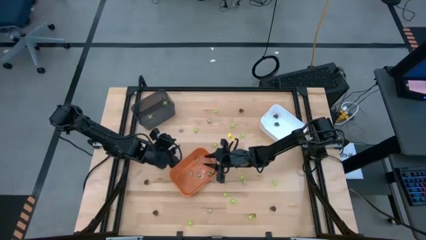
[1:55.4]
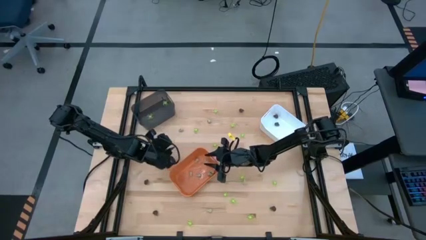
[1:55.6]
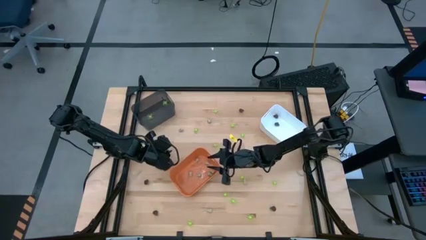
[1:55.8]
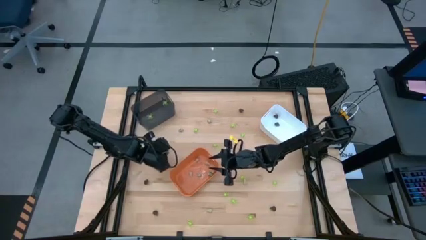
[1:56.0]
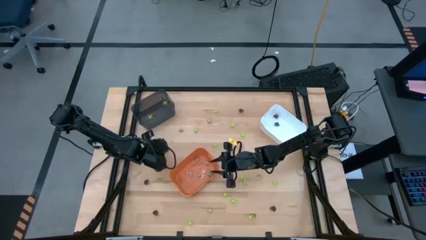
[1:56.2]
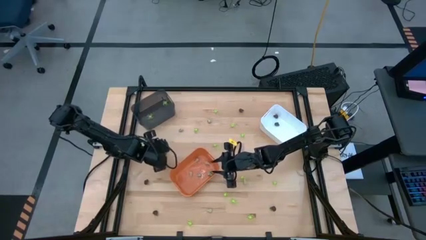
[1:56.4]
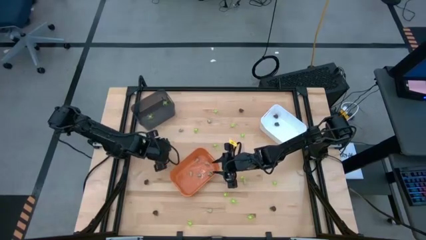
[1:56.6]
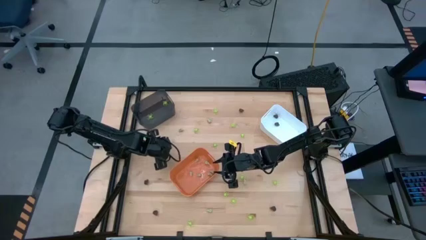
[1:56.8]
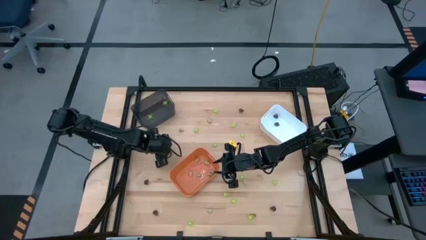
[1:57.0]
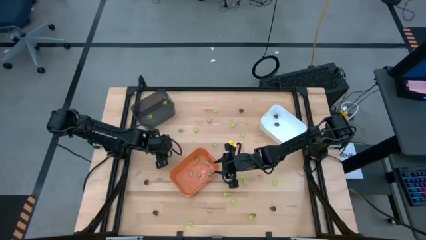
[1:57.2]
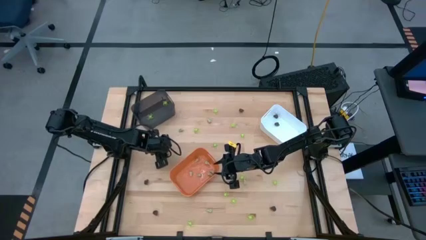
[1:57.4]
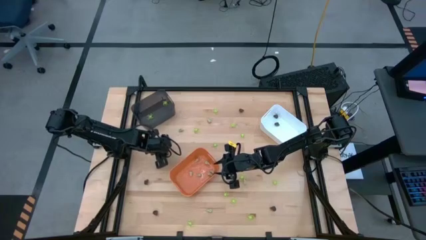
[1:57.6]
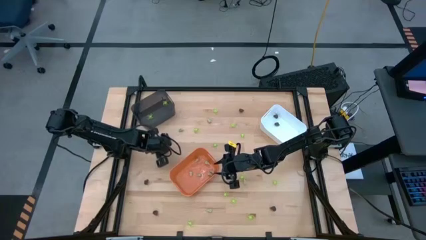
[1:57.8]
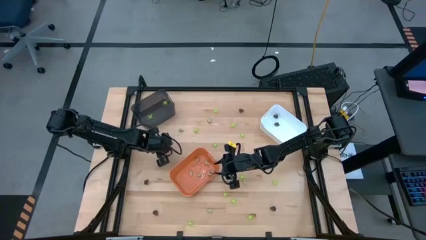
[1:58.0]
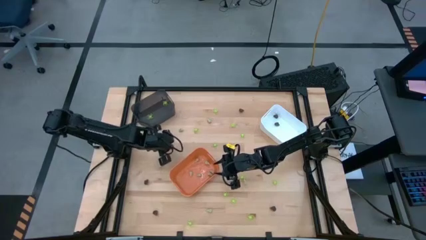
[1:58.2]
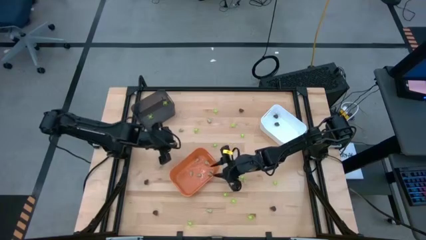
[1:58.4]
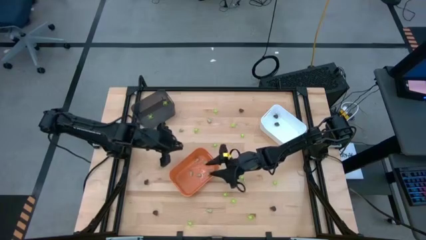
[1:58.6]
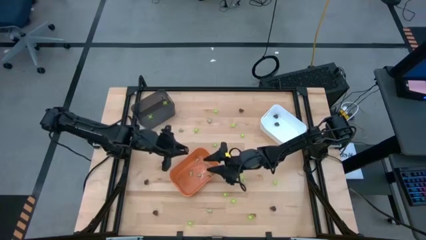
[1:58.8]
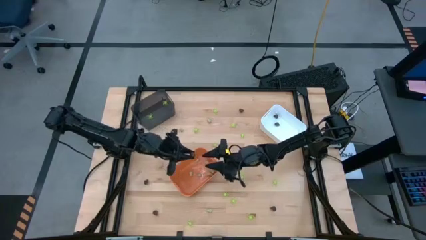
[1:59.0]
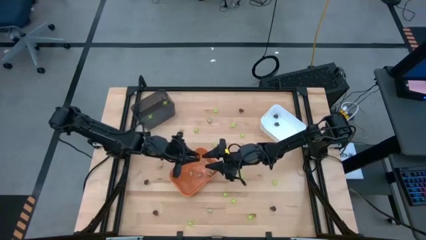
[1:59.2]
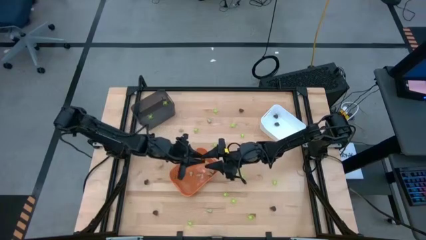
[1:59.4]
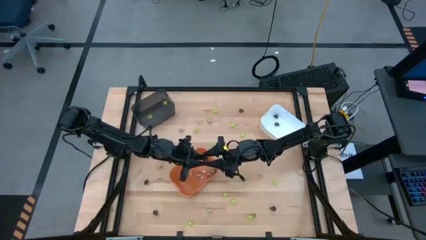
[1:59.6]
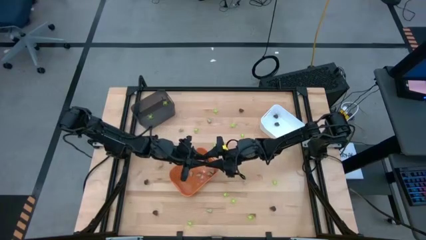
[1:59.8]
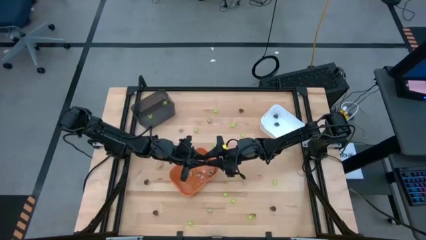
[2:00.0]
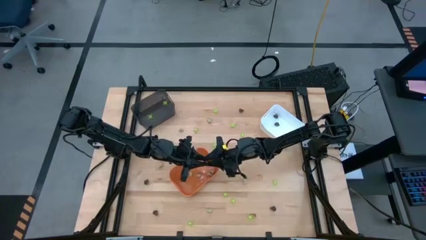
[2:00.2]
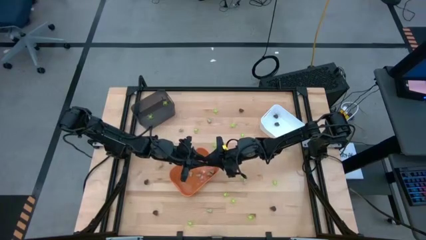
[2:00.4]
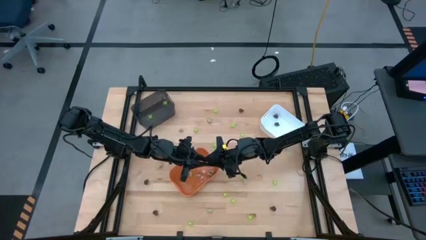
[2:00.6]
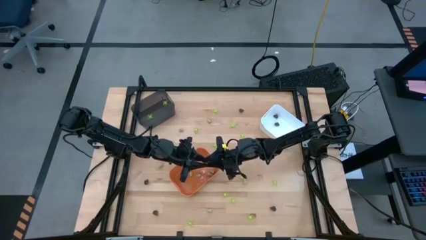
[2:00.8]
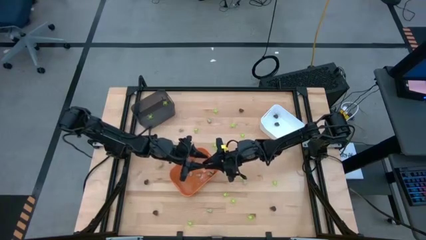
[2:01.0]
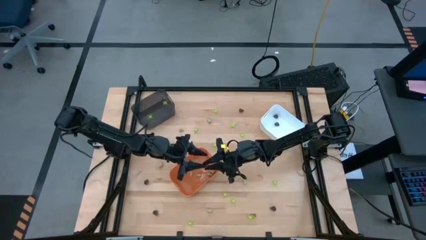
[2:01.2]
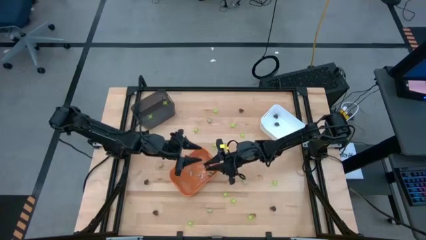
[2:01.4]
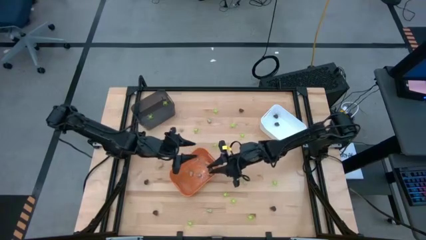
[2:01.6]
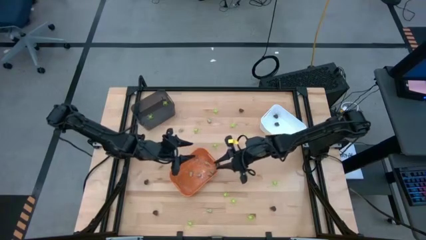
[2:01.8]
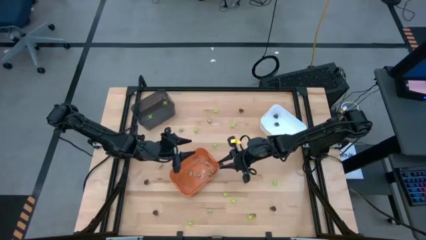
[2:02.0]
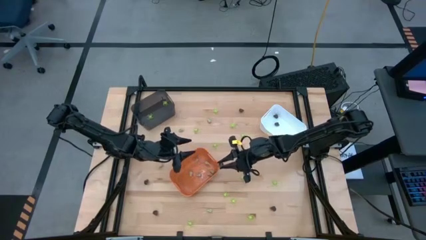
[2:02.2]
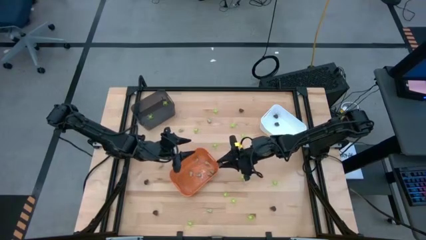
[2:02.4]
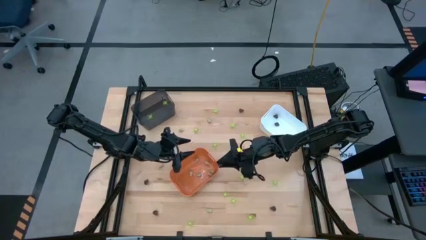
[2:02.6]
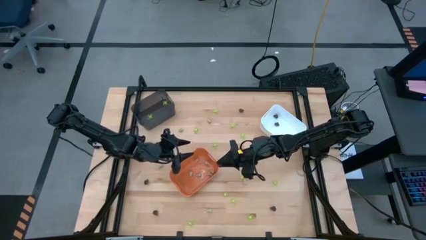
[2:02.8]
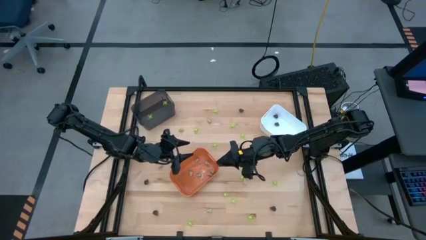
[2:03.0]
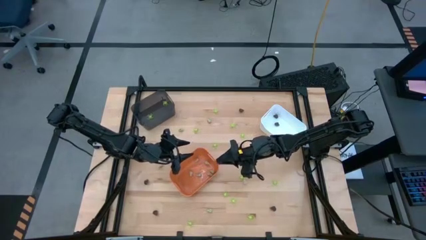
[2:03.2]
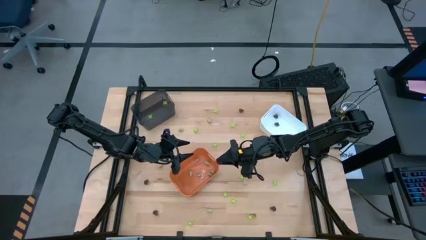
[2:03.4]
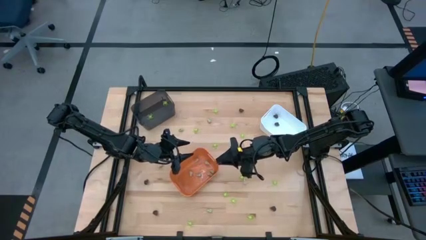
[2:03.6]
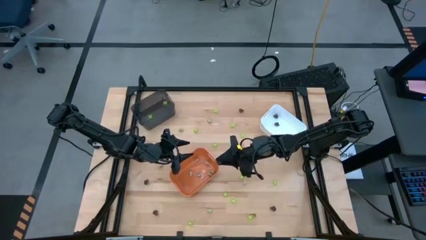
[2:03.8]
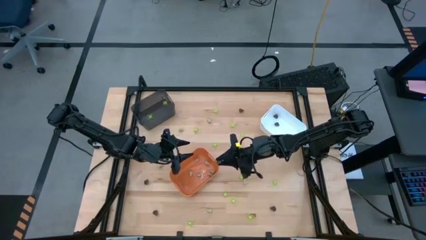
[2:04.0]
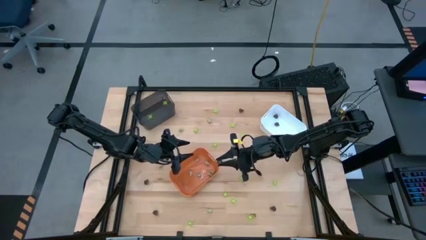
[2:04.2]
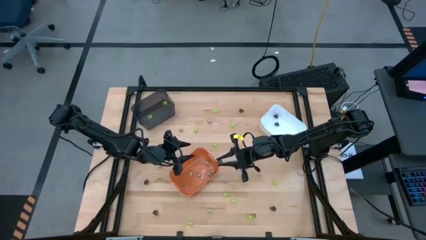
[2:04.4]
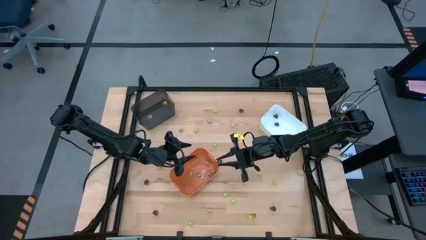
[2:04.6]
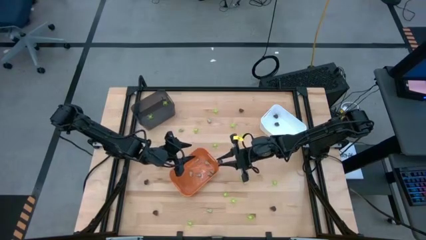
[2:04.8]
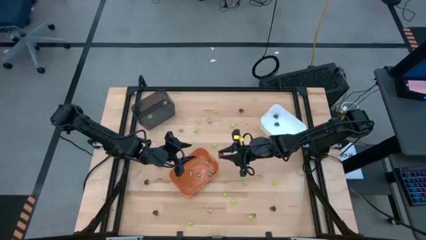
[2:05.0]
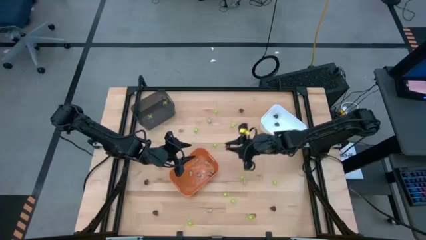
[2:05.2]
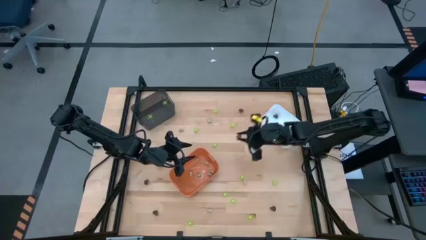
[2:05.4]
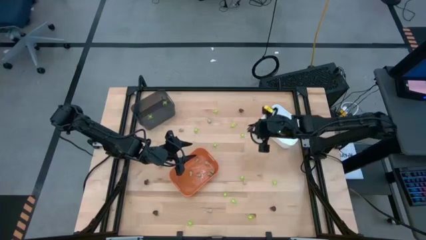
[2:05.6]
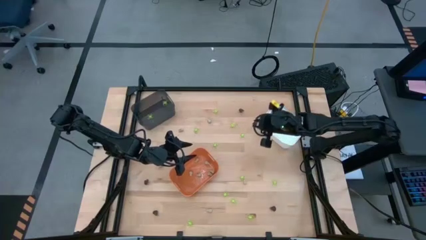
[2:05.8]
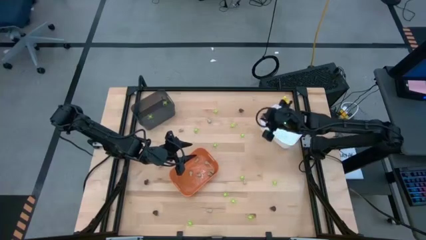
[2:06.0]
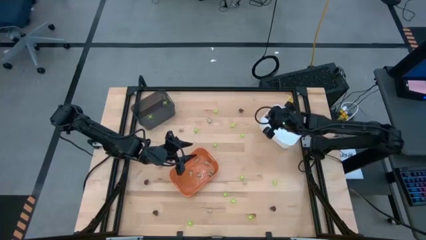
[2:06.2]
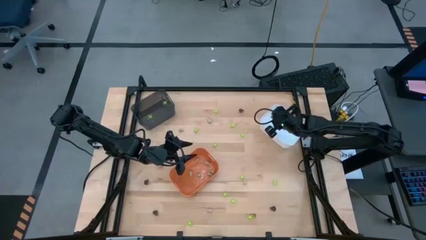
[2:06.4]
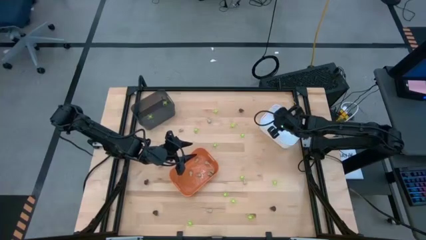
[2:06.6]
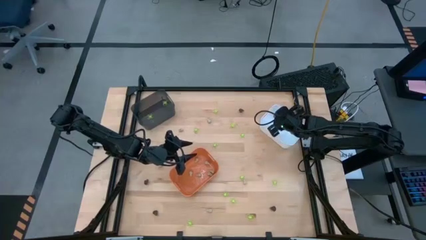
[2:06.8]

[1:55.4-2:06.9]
Task: Sort Halloween decoration
Put the small transparent skull toy into the white bin

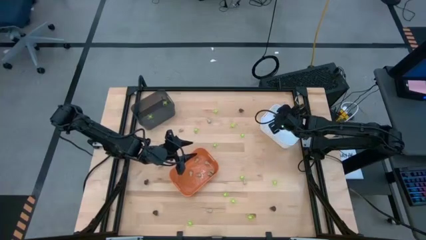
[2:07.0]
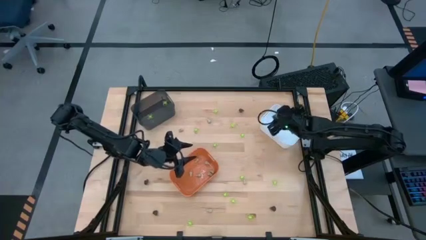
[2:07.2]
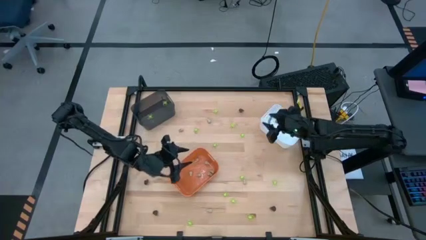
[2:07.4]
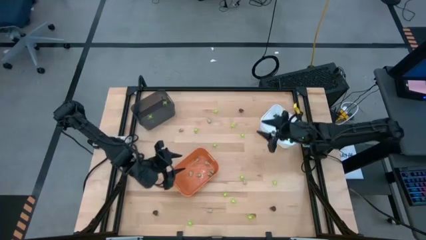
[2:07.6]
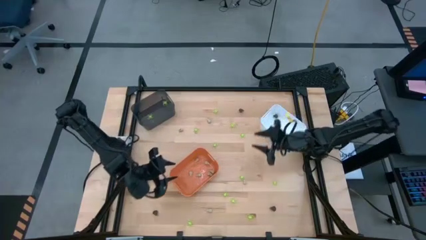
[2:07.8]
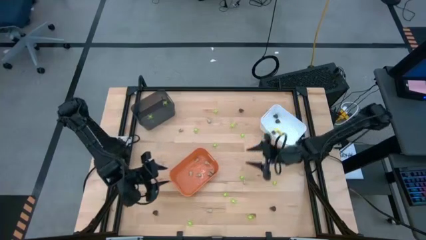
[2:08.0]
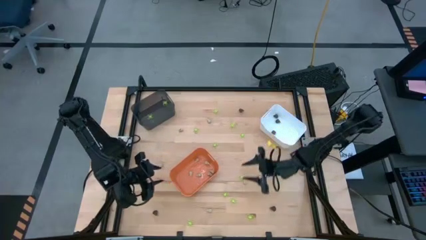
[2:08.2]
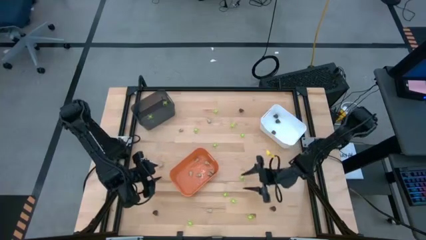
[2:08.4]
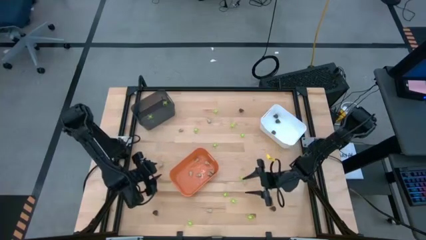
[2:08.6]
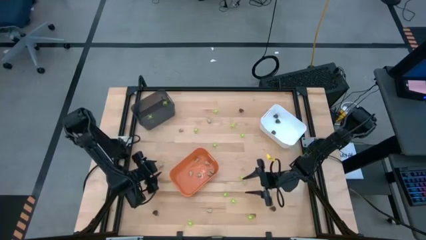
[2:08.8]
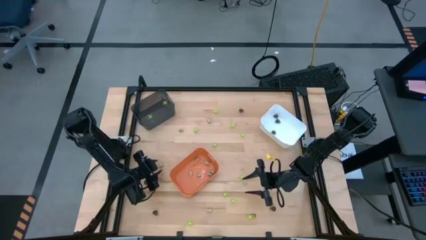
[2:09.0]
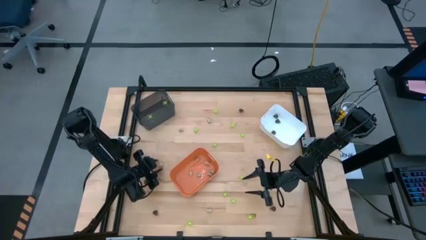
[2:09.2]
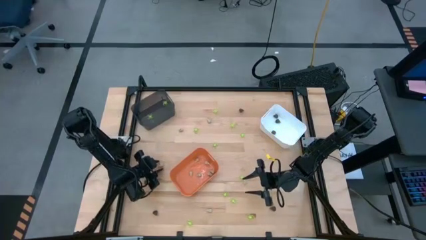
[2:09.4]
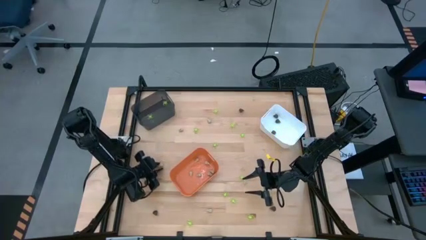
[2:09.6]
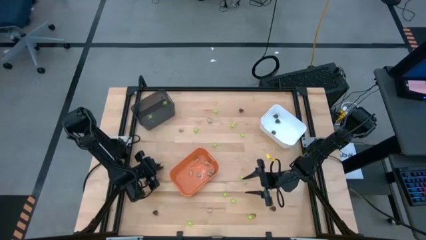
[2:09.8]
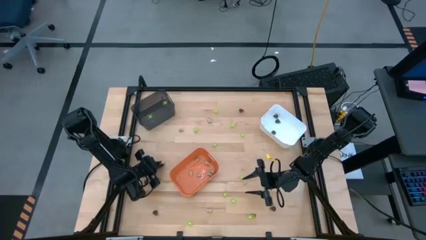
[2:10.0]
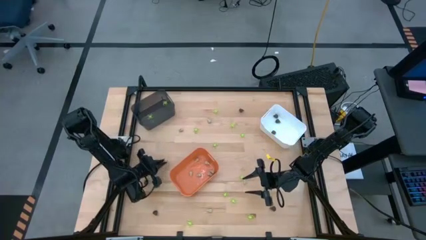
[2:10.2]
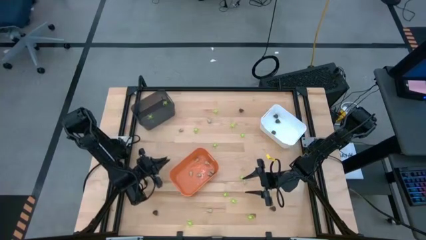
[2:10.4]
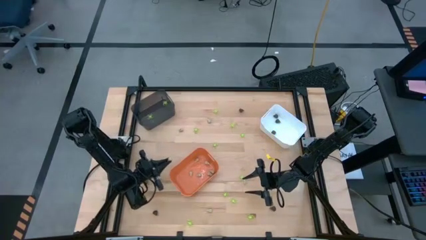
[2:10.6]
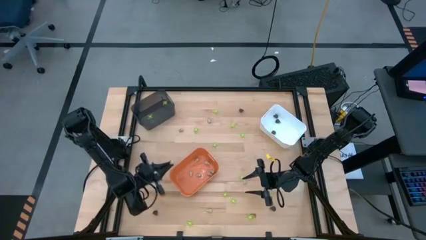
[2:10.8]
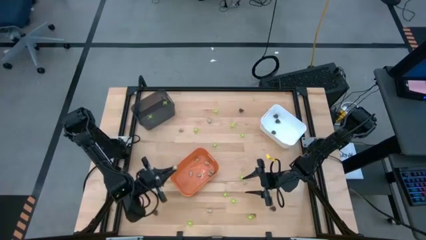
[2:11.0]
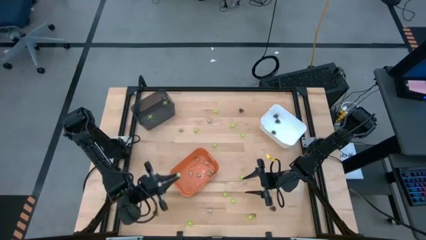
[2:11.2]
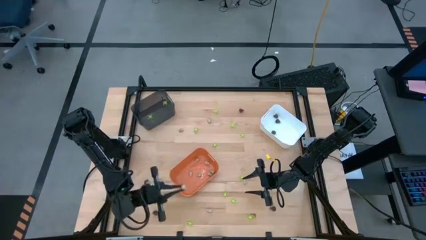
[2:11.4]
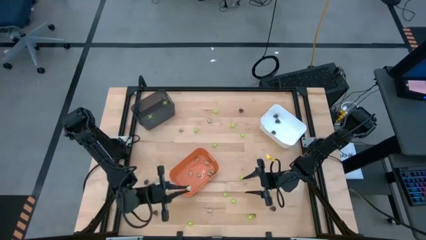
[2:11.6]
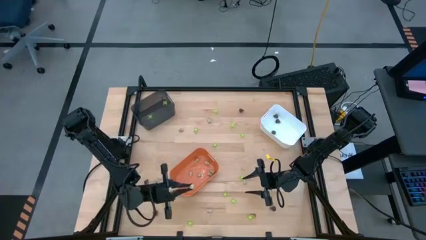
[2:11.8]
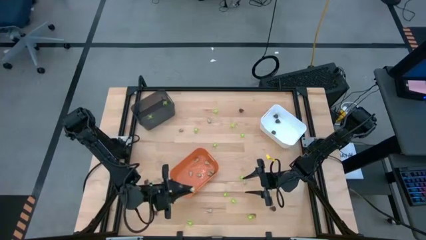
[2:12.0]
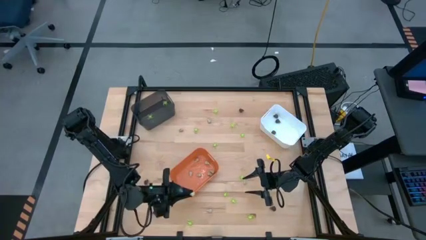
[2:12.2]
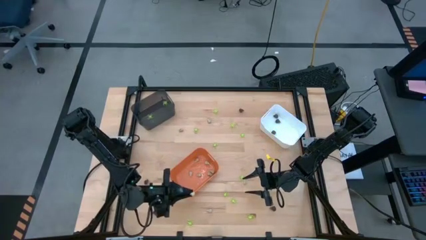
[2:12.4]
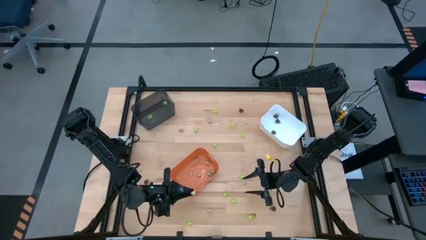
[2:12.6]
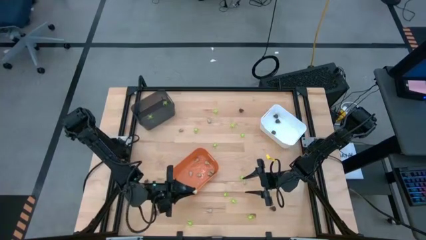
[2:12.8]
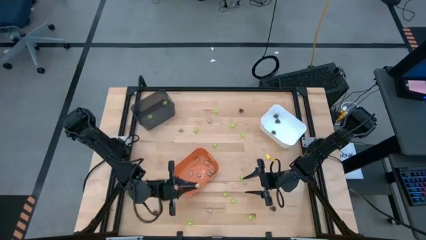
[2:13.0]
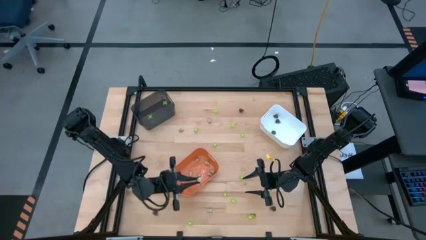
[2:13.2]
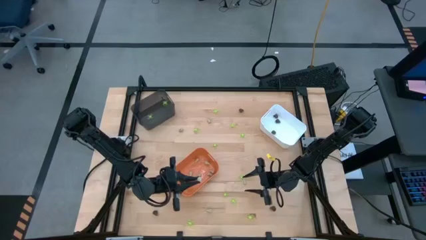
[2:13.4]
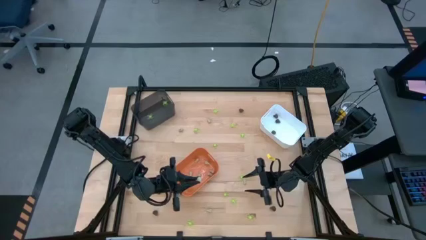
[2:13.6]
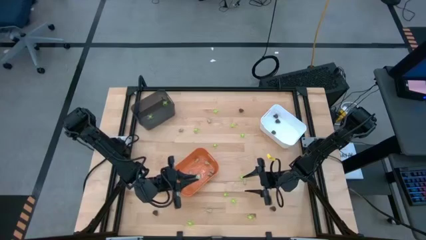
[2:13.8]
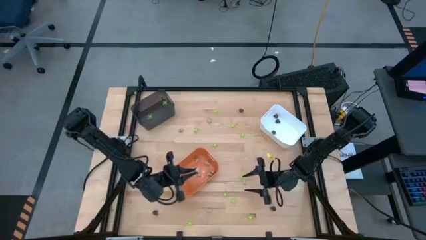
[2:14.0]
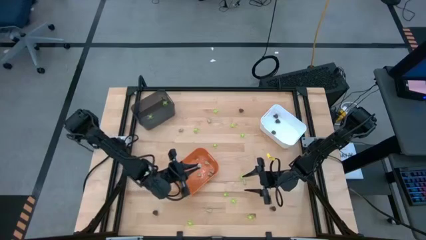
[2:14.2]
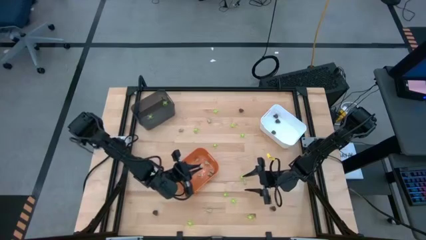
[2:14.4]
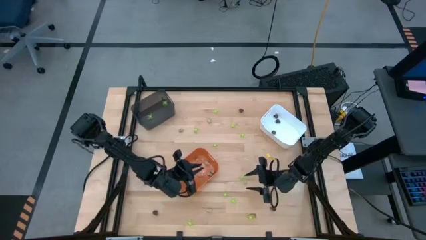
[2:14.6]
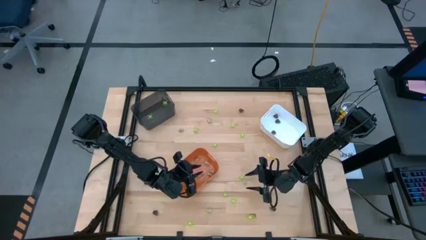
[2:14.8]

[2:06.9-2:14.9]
Put the small white skull toy into the orange bin
